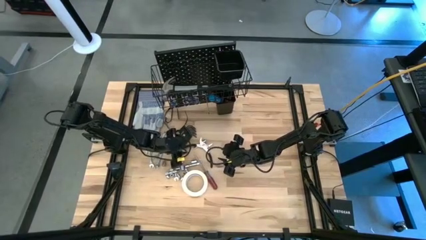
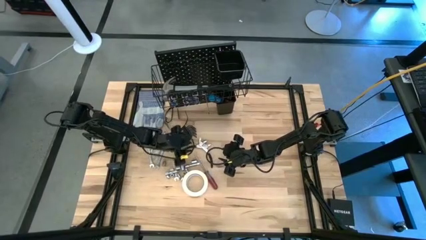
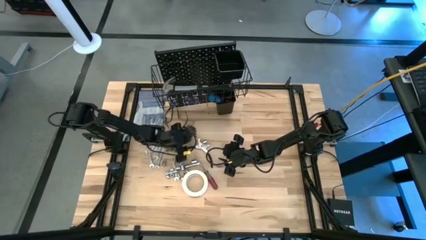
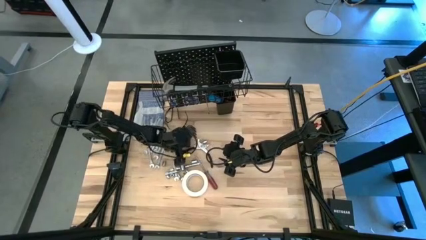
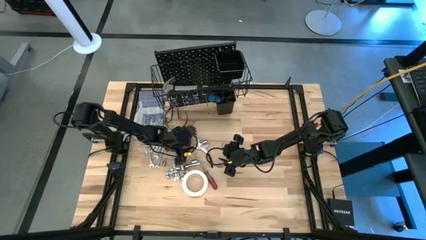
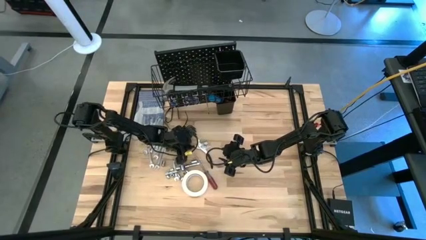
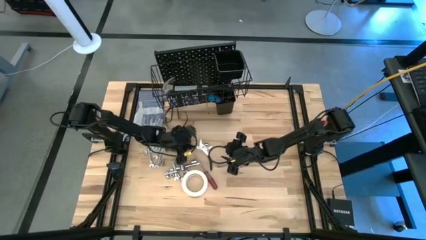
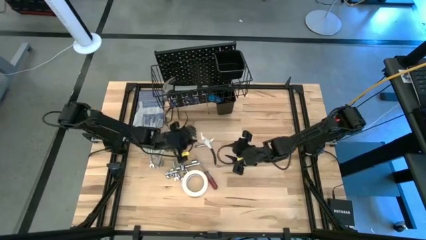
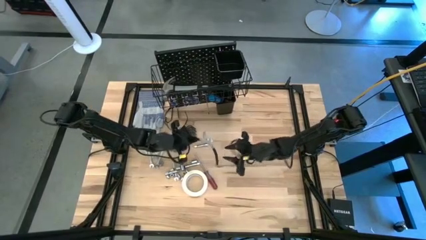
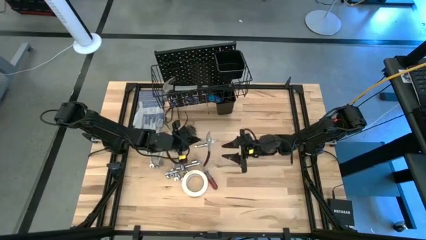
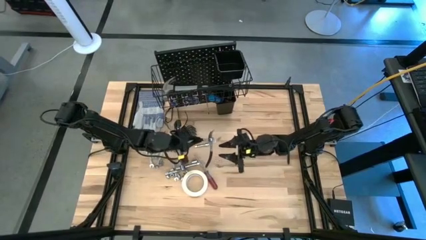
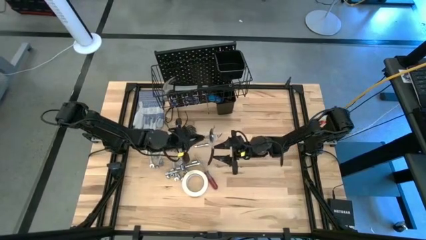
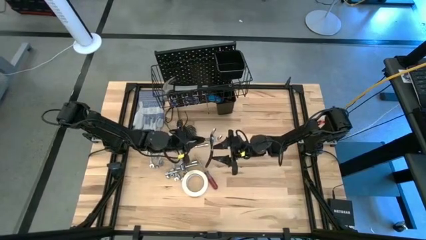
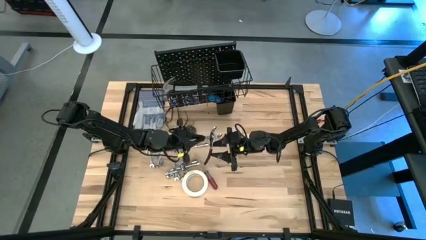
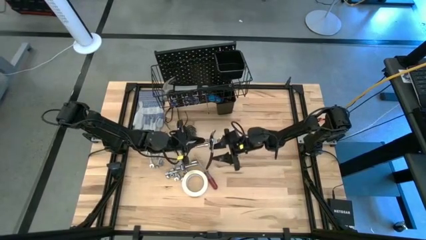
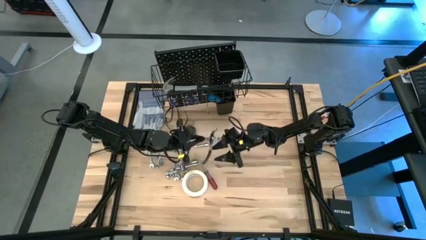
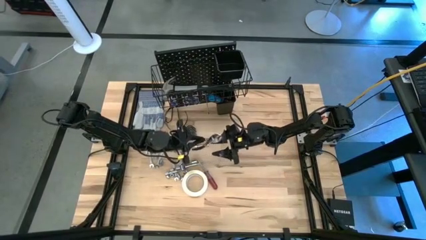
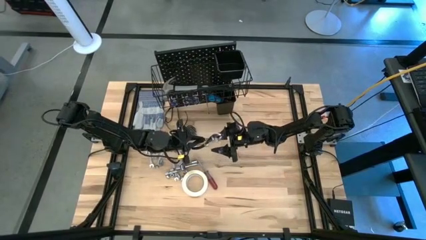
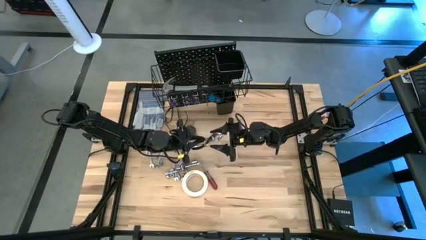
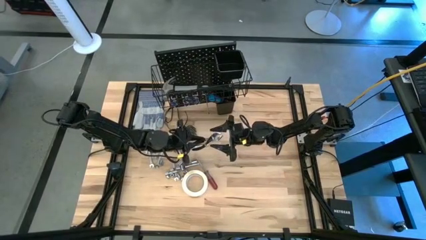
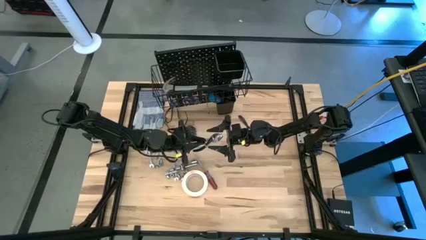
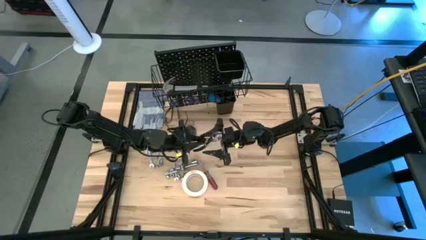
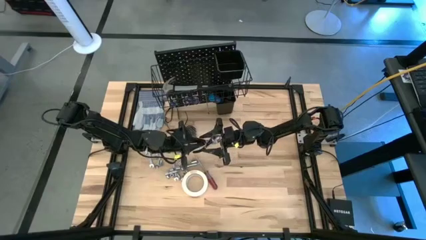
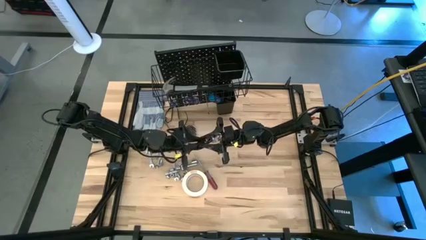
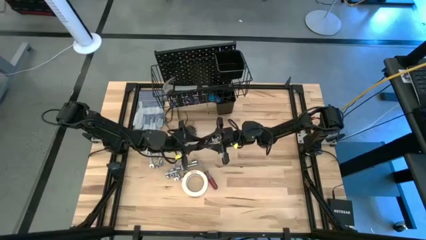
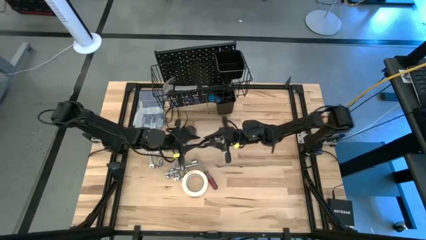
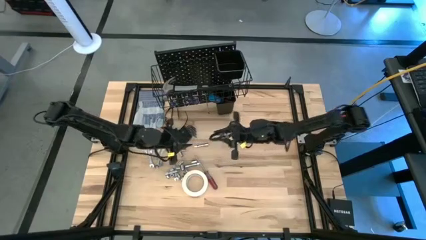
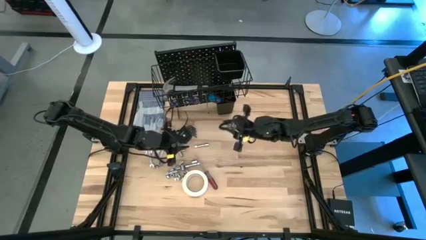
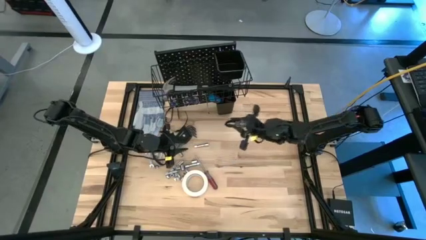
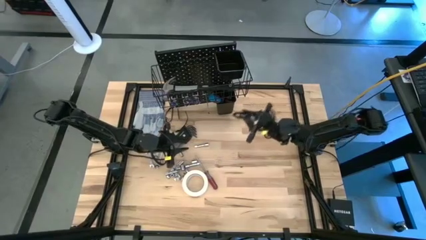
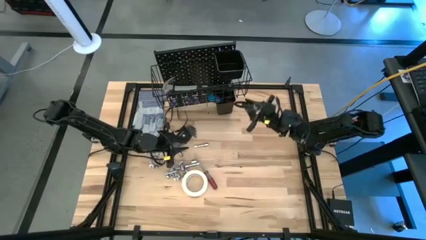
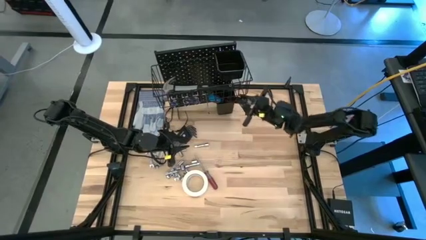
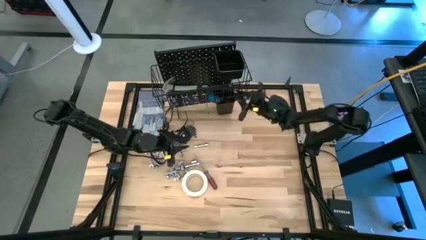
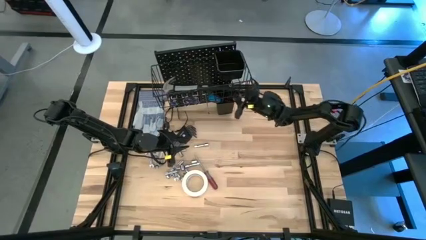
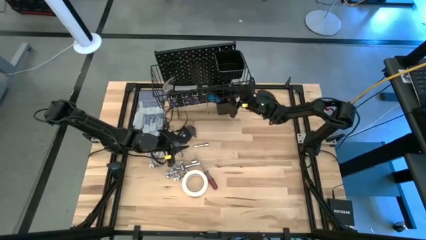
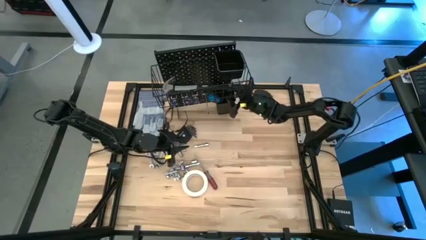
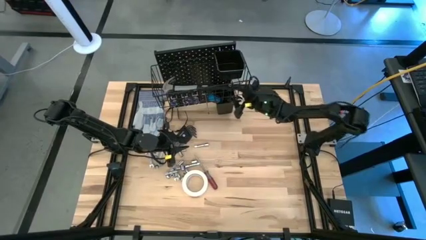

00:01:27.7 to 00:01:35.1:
Task: Hang tools onto peg board
Put the black slip-joint pliers into the bottom black bin on the pegboard

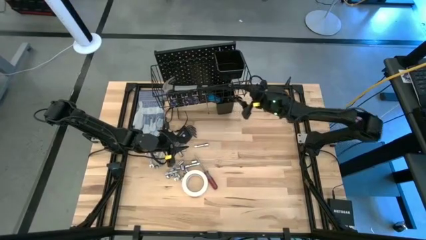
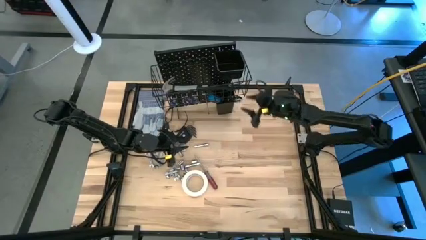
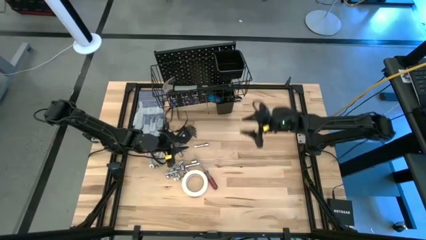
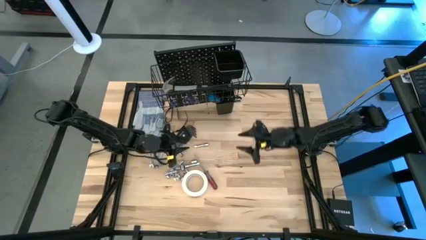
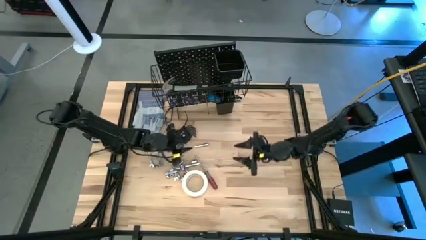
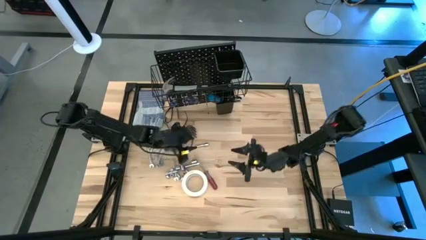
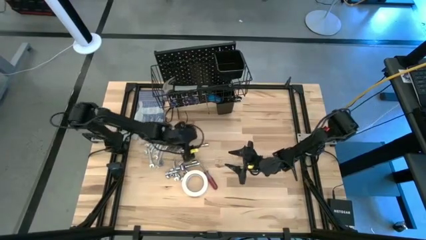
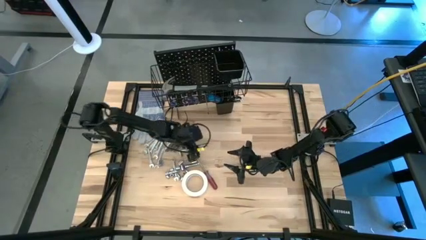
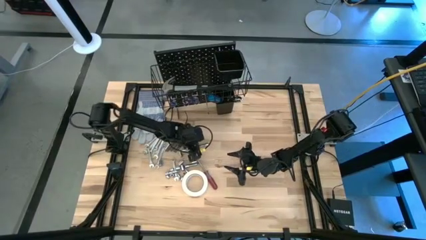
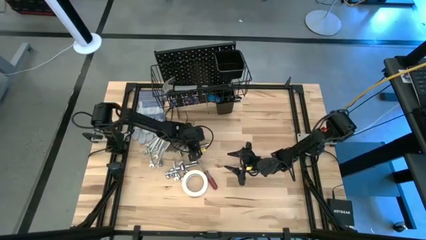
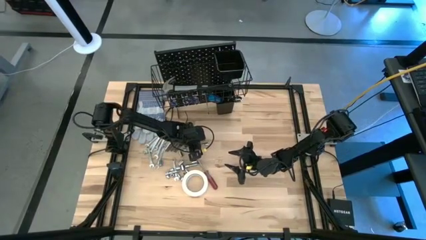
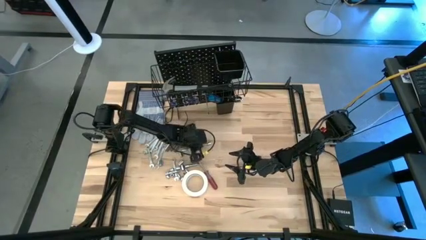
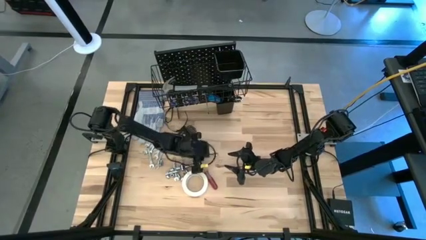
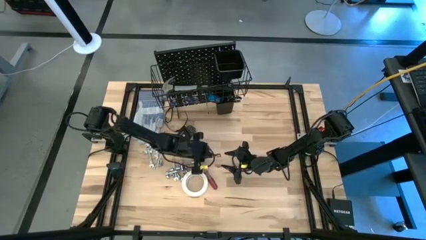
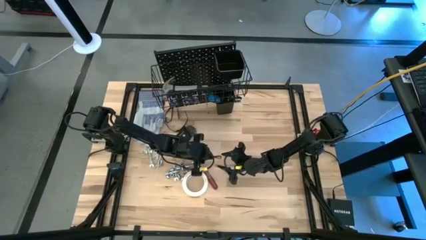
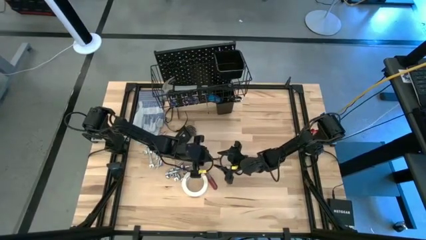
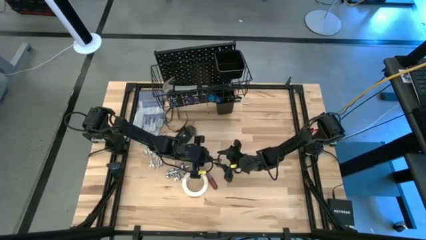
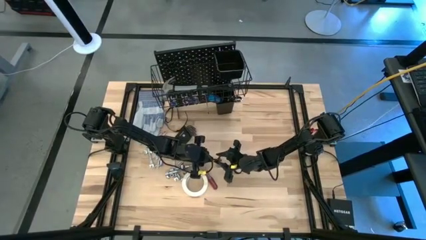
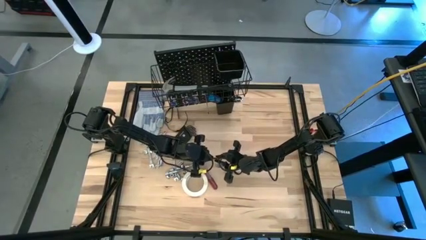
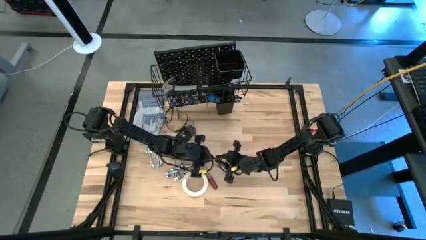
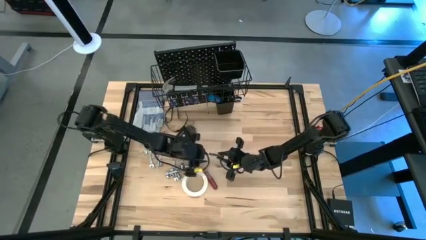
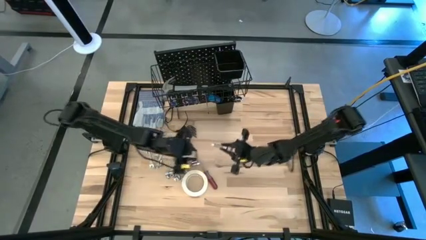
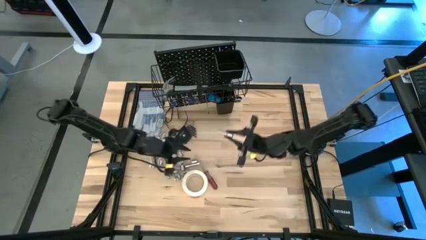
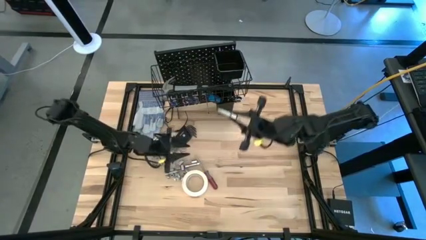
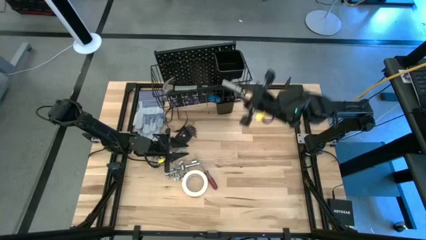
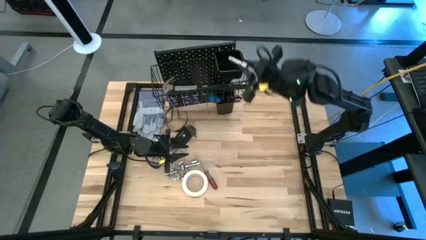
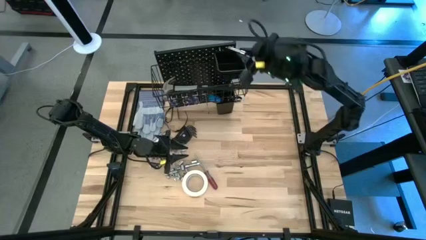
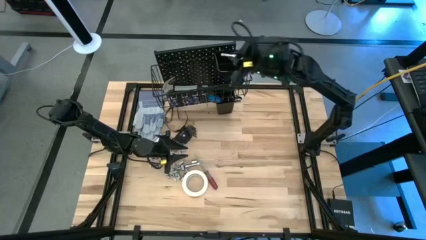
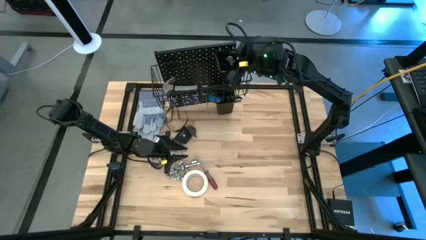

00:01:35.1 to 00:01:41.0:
Put the extension bar into the top black bin on the pegboard

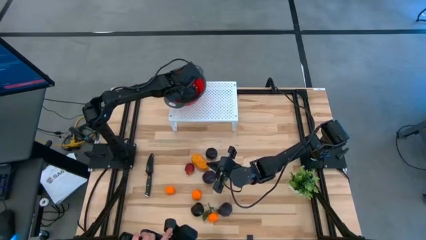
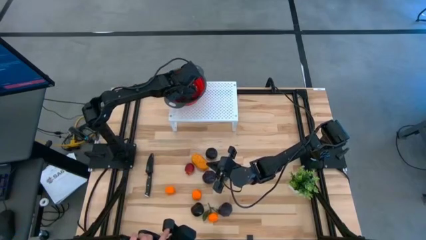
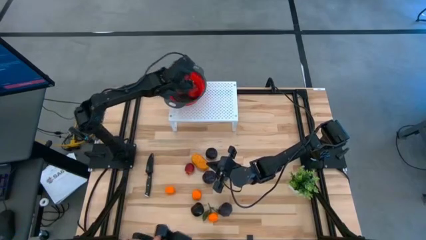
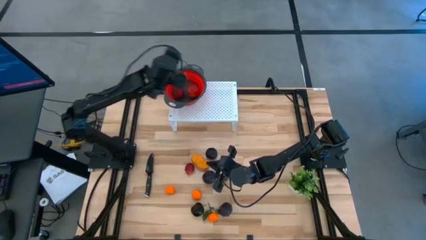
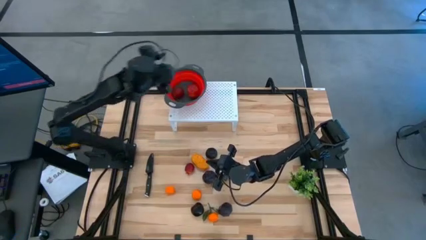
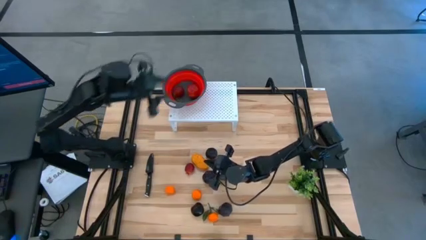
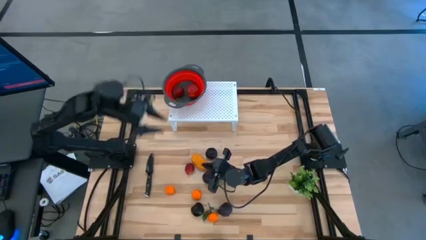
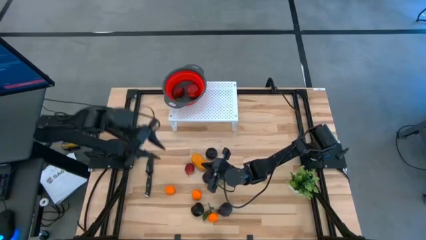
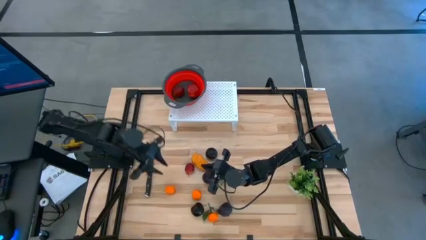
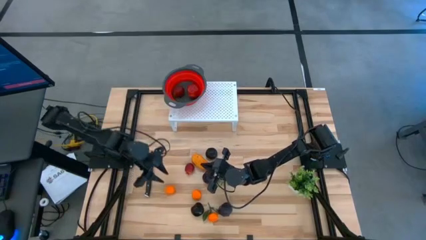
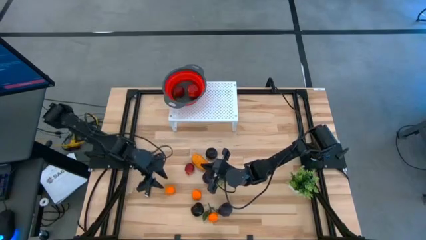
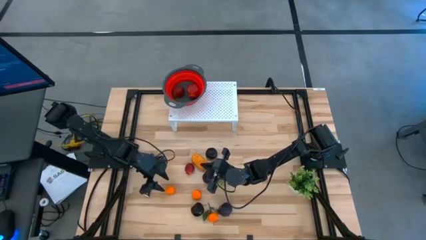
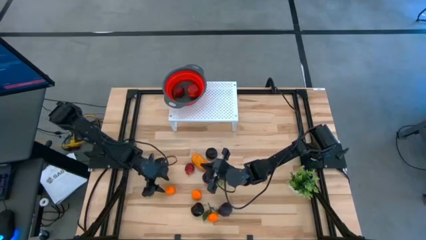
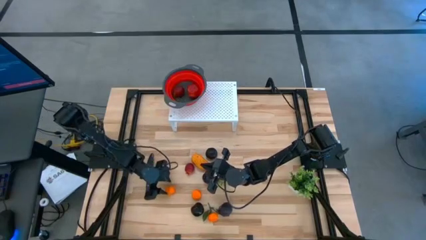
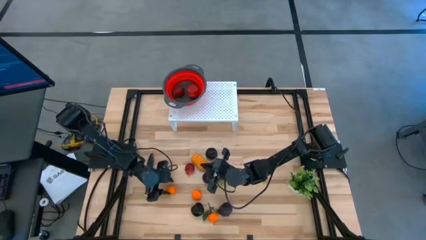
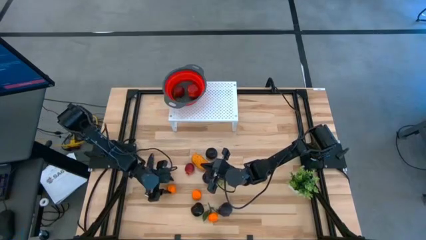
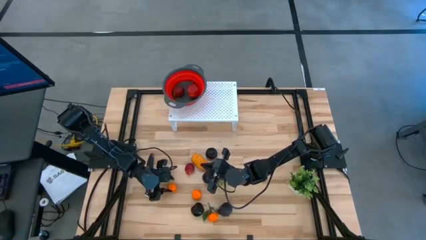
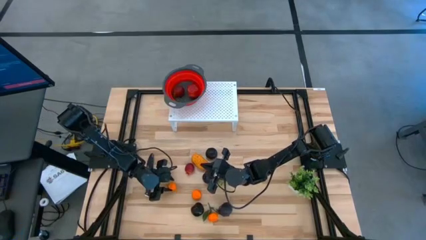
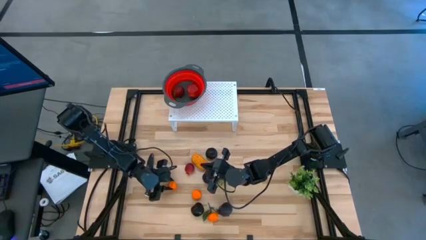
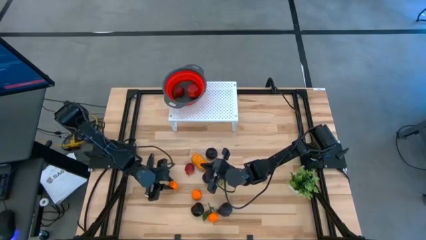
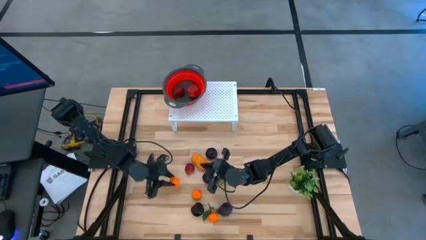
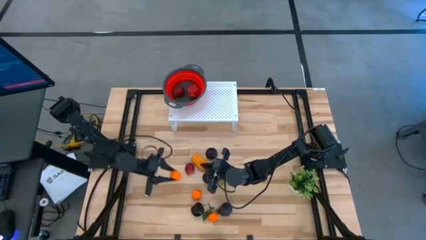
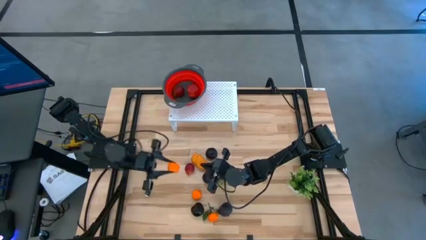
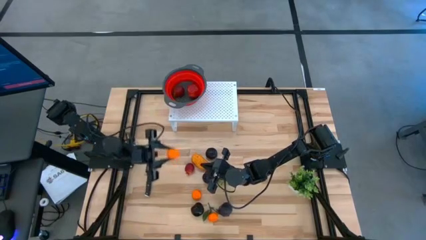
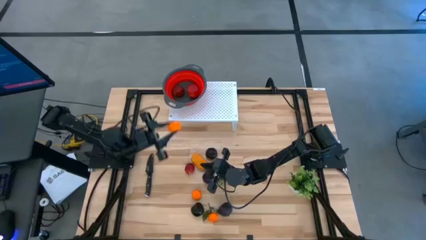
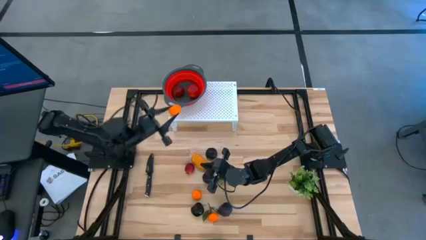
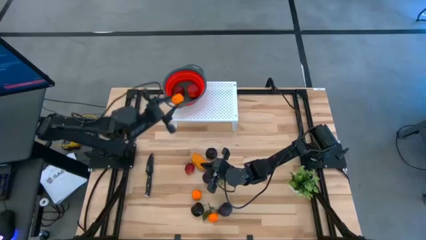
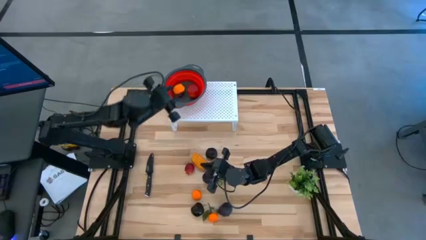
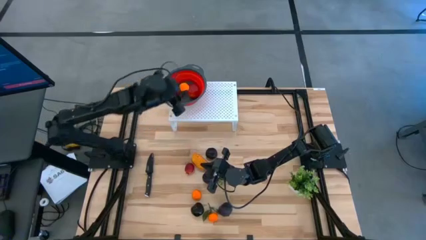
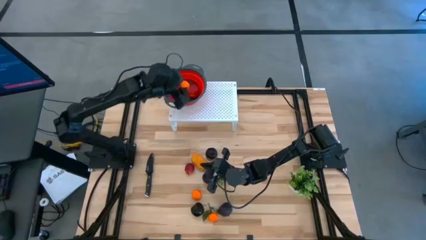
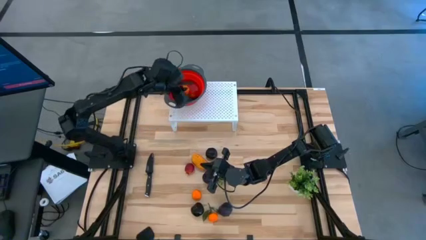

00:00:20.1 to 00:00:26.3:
Task: Pick & Place Fruit
Put the orange into the red strainer bowl on the shelf
